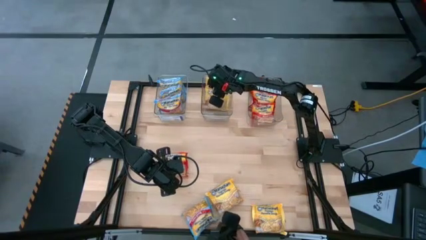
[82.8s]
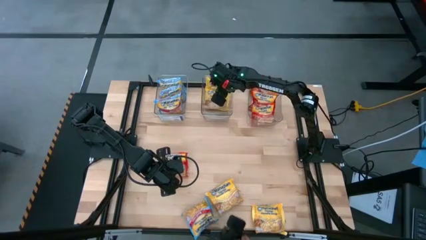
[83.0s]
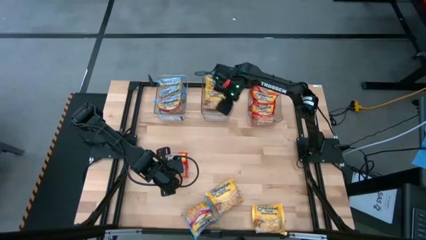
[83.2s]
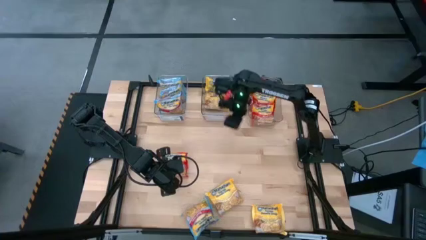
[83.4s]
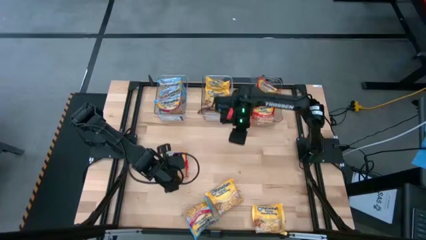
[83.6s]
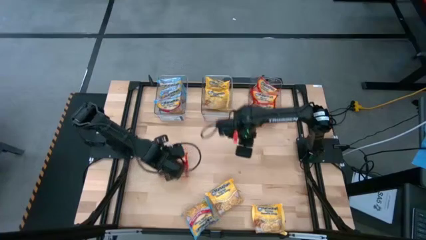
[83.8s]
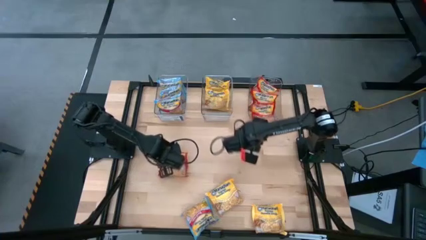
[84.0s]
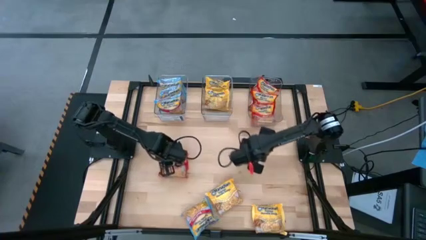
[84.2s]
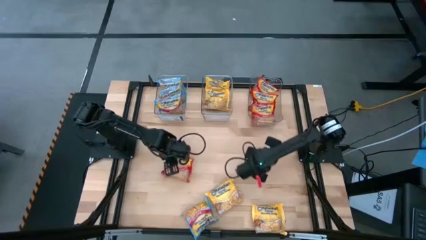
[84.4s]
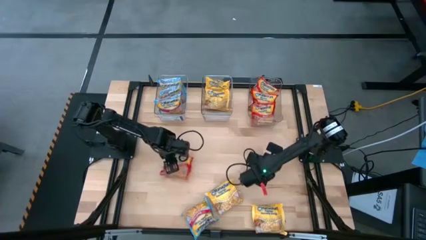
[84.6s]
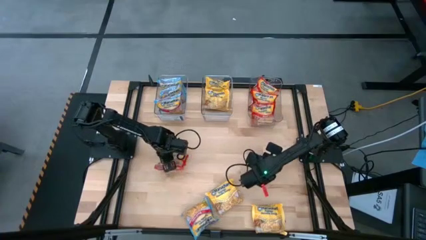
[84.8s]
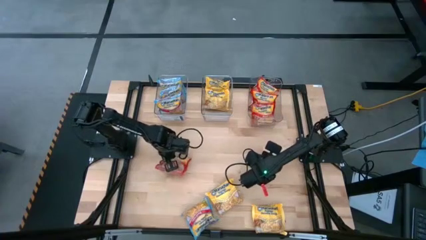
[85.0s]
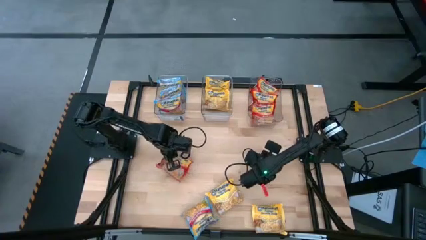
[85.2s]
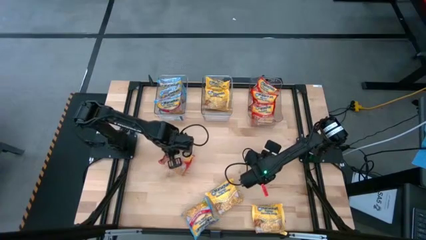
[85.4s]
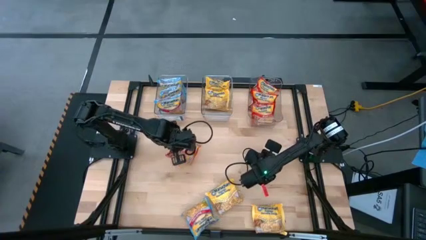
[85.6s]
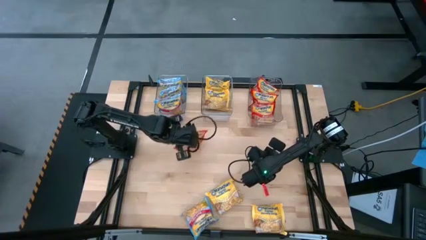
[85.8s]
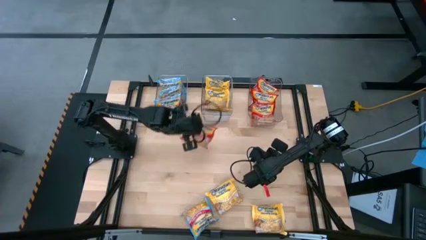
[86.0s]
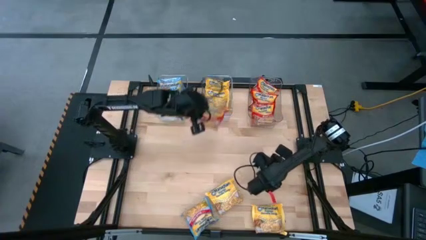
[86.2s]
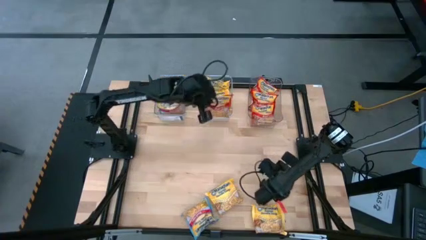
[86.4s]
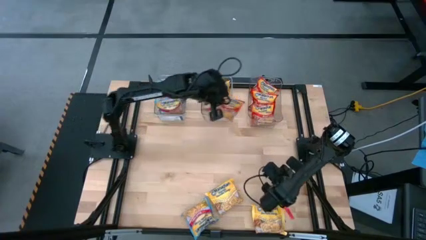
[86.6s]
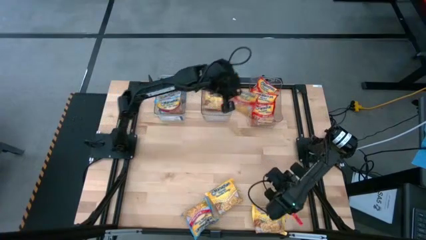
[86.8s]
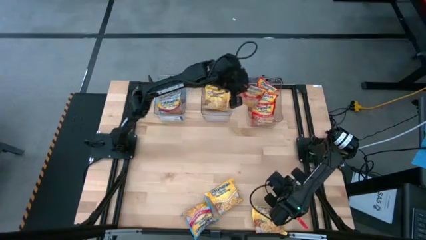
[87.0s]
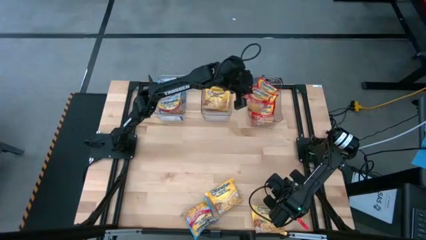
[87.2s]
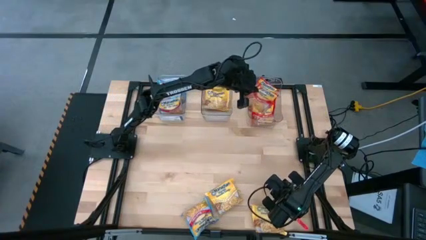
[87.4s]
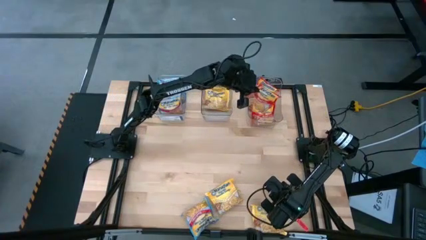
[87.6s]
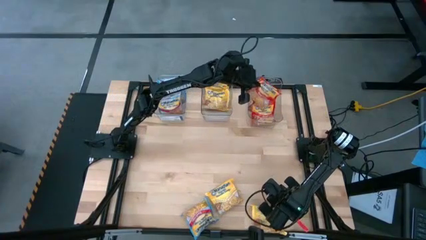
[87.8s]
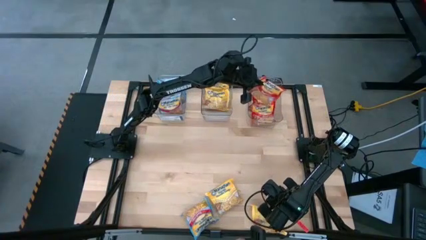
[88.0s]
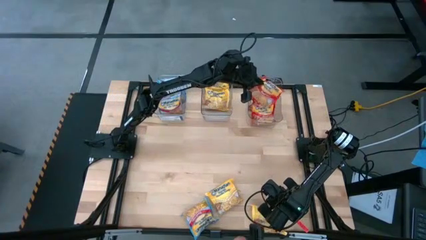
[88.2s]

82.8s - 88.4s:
Task: Sort Maruchan noodles
Put the red noodle pack into the right transparent bin

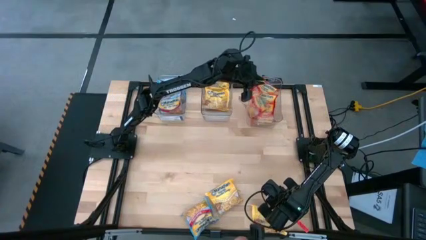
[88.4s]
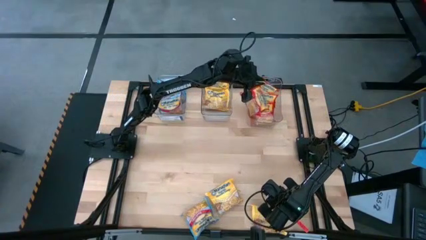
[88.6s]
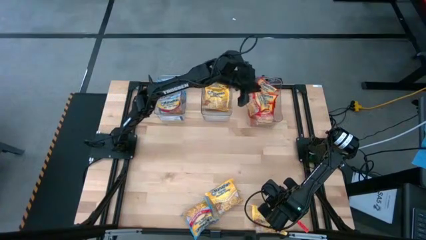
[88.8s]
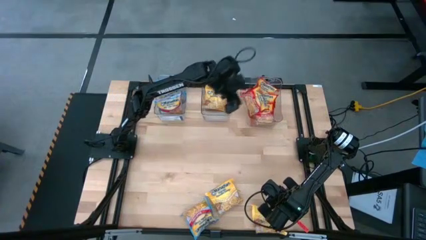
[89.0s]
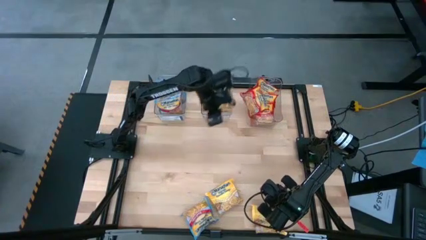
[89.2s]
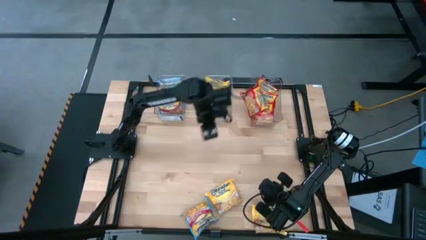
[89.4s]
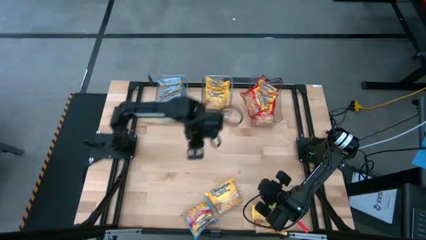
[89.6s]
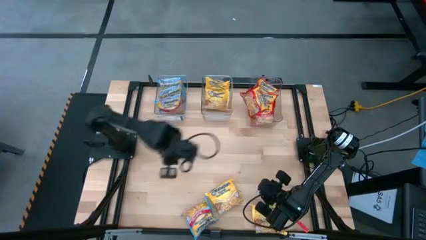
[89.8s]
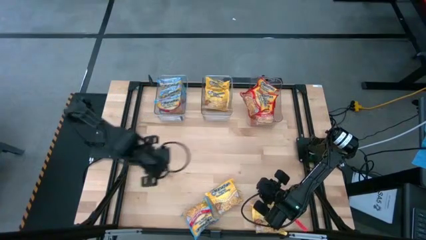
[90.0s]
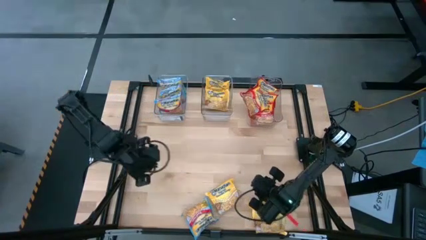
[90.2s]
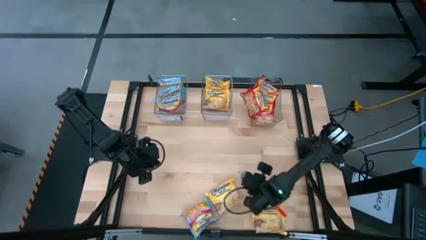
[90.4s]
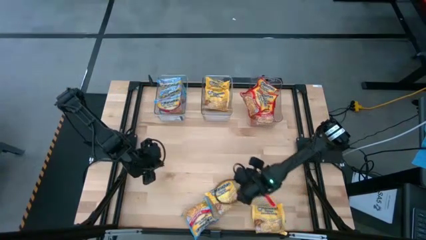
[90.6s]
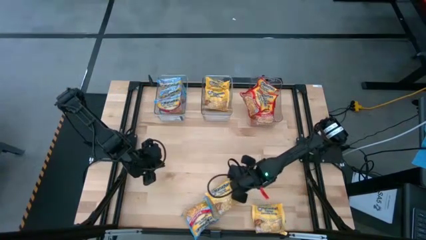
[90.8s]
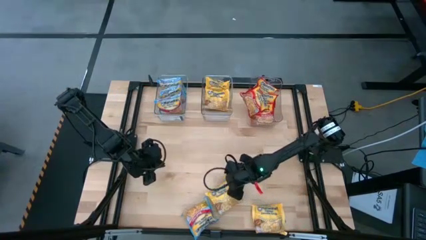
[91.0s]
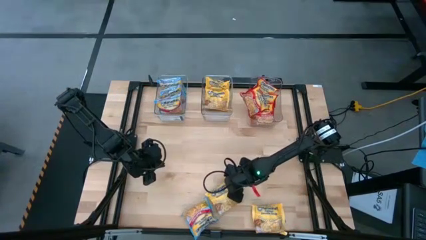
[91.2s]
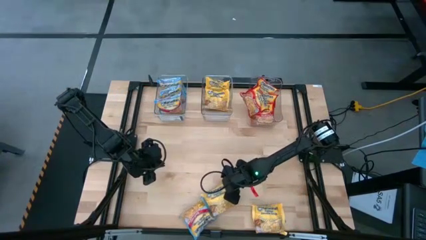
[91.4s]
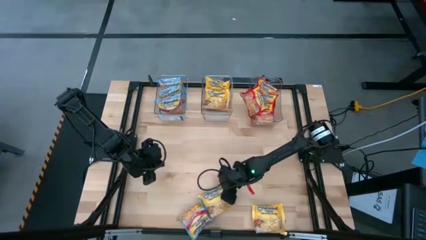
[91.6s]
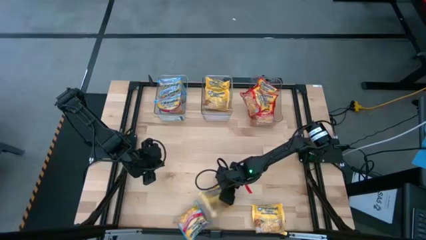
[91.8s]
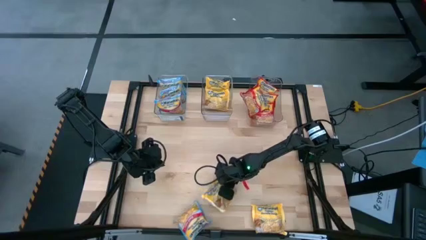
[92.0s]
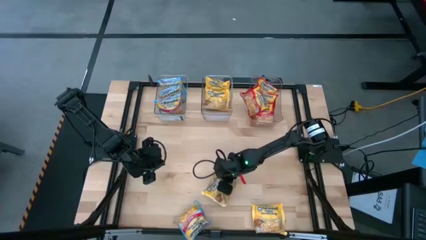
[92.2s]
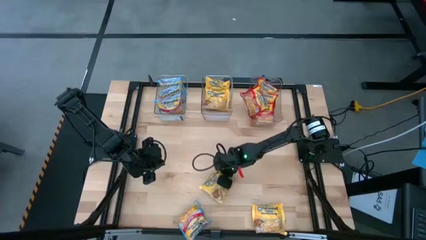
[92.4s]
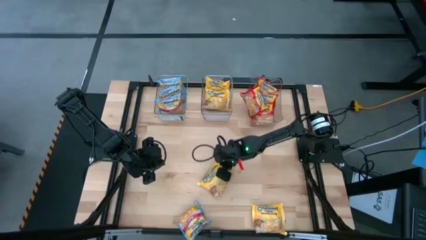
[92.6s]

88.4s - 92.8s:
Put the yellow noodle pack into the middle transparent bin

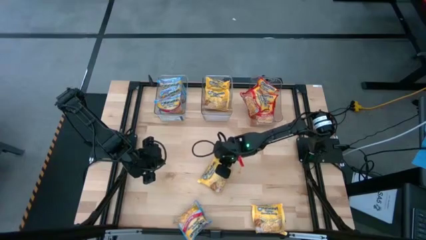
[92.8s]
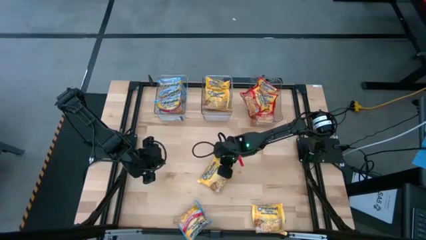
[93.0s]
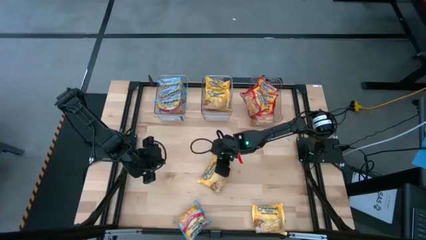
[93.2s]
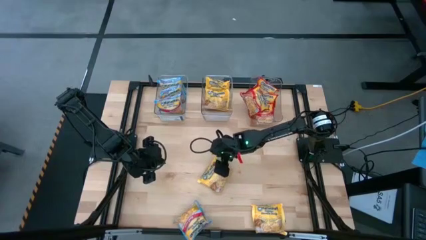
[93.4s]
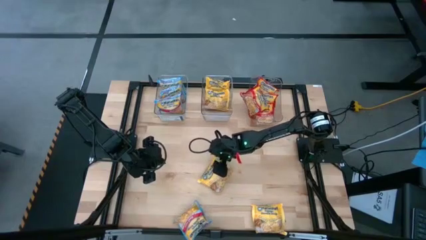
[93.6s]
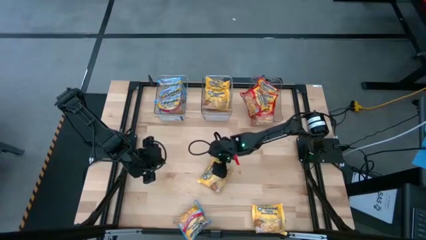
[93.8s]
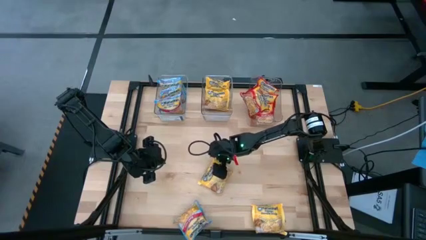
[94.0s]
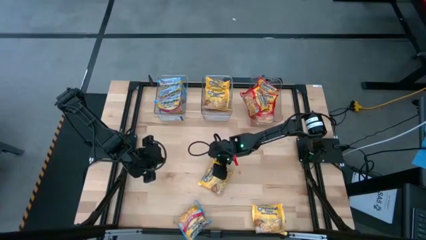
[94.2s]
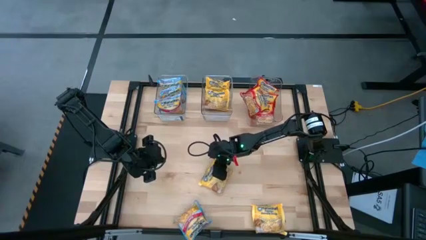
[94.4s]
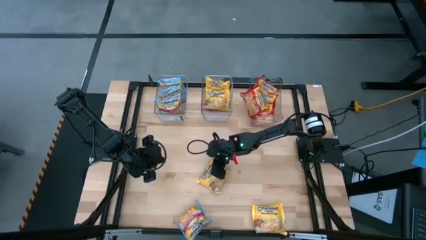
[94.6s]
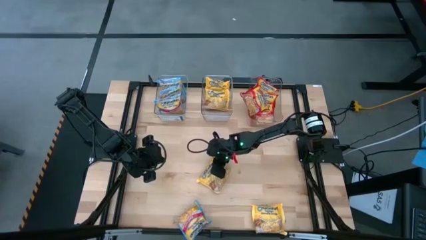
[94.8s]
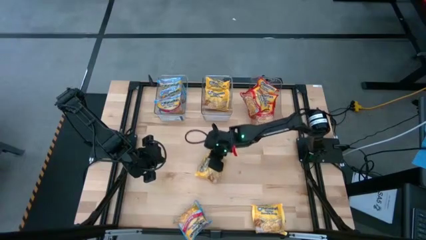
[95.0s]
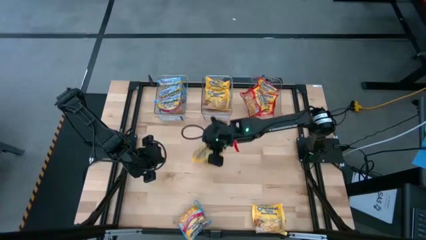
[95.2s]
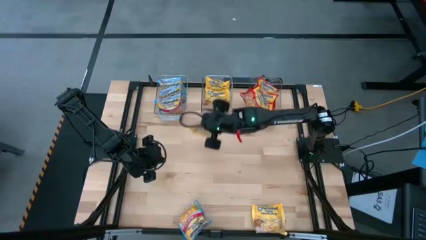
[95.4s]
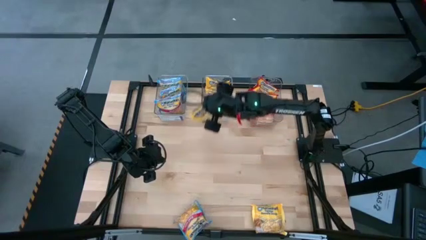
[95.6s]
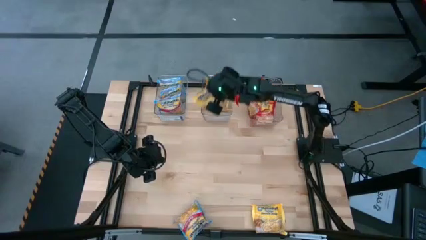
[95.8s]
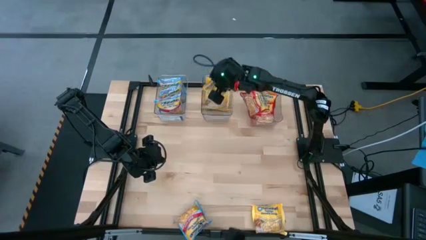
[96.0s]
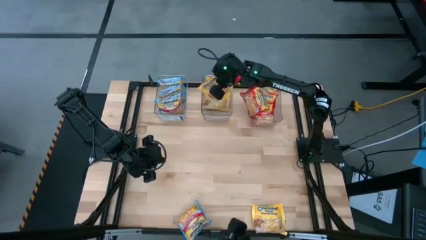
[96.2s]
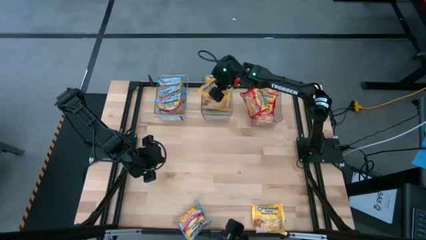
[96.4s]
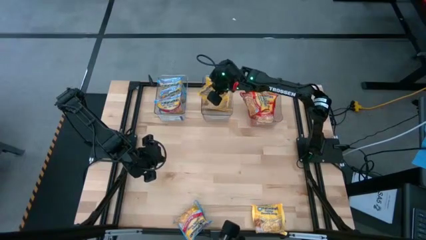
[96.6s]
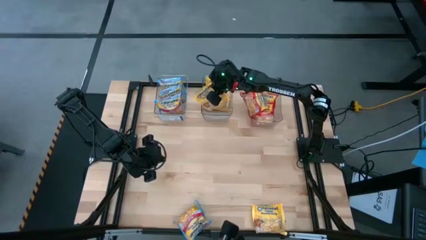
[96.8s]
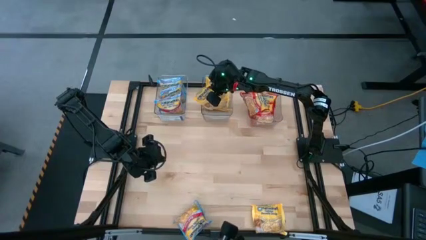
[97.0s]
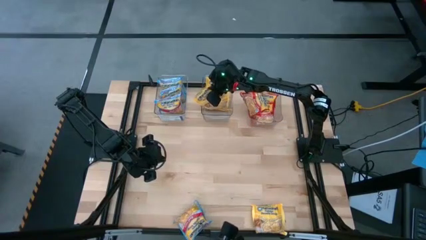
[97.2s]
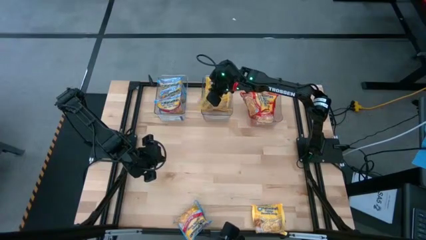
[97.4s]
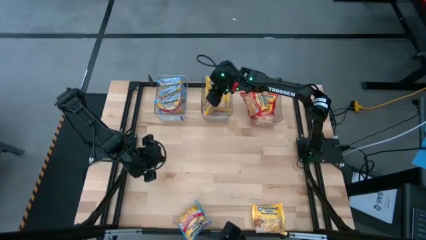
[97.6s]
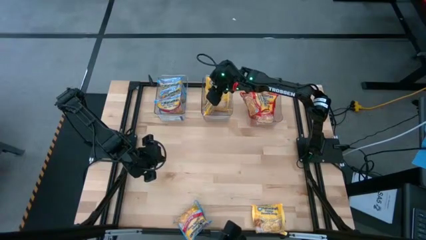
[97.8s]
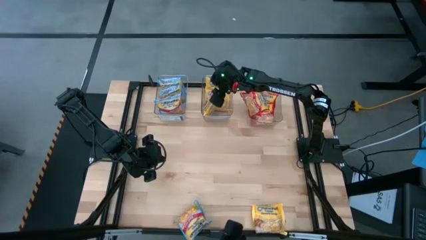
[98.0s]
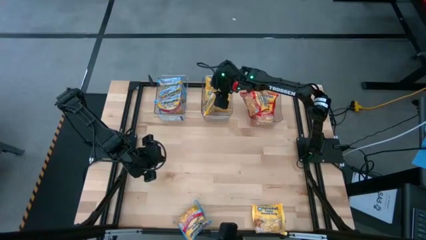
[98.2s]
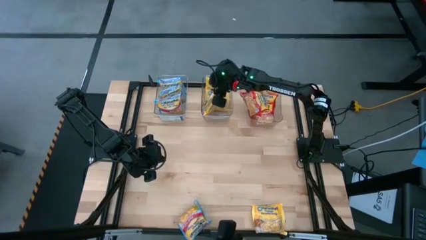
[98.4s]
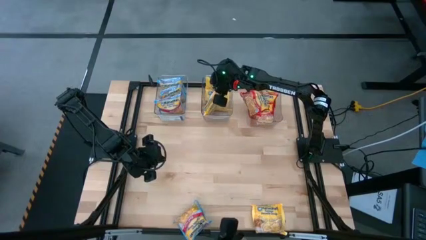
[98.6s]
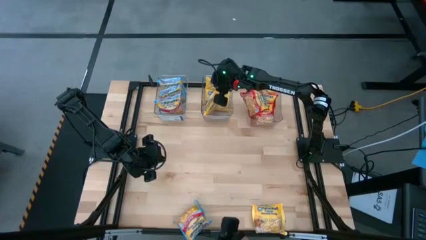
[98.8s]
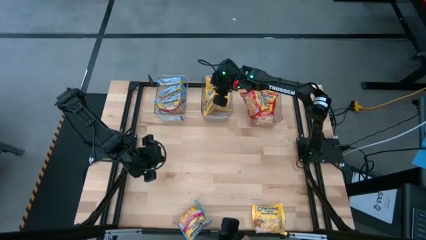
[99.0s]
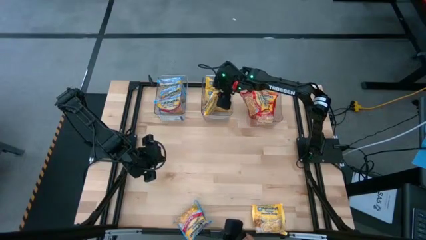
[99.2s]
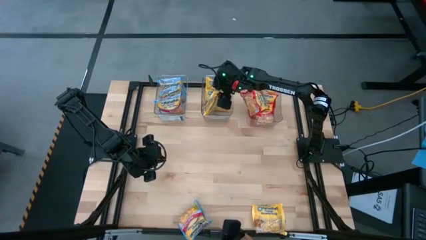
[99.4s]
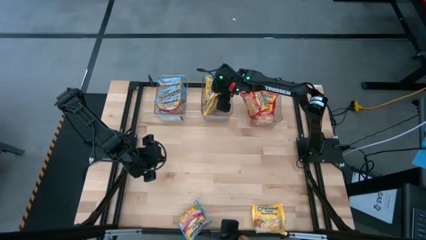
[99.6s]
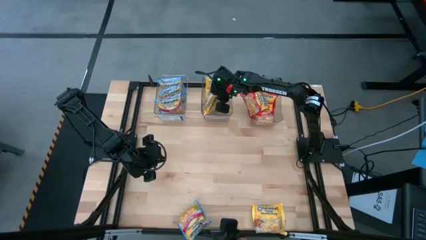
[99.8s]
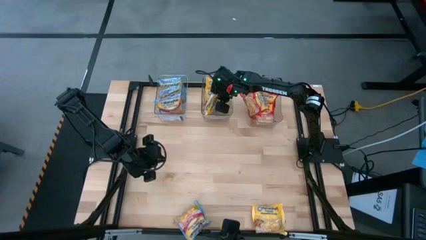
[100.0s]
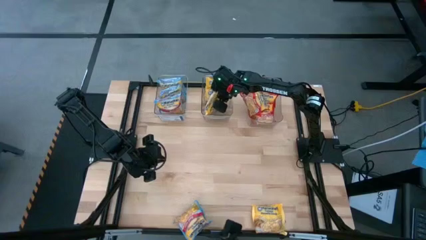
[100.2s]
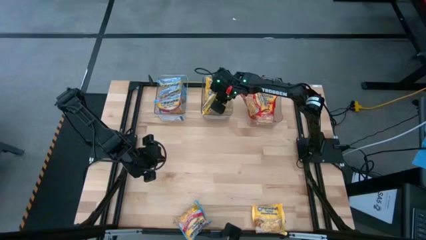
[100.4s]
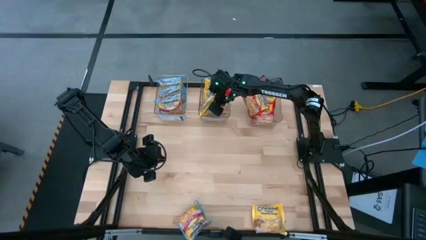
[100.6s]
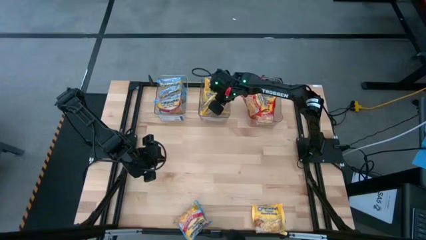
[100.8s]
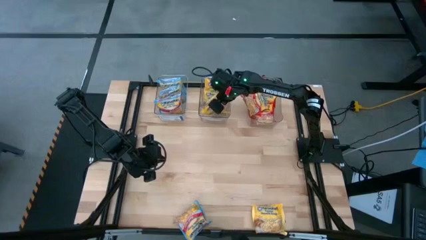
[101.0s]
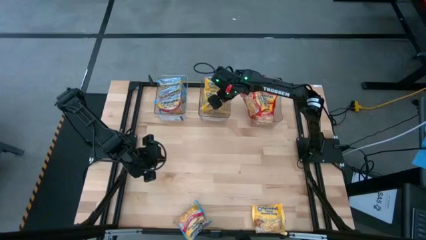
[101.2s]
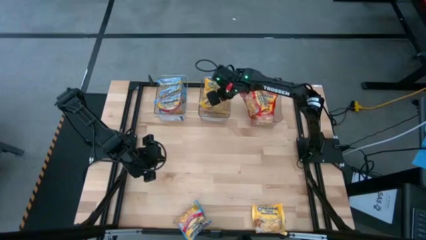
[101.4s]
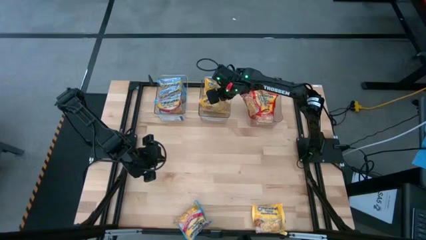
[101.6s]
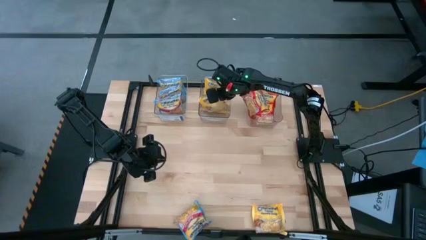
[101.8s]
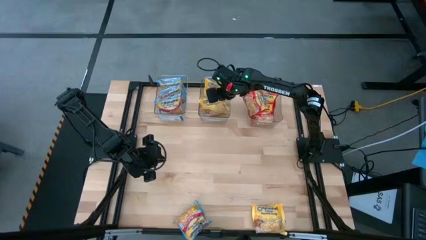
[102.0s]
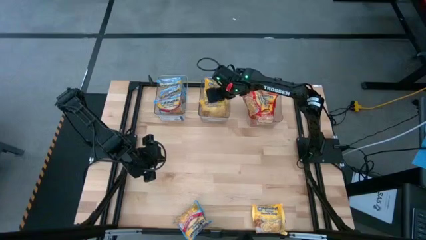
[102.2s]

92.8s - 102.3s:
Put the yellow noodle pack into the middle transparent bin
